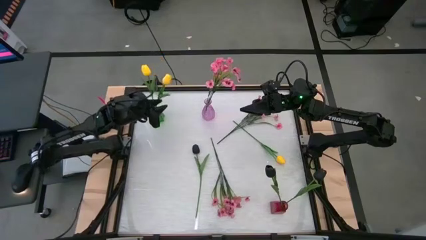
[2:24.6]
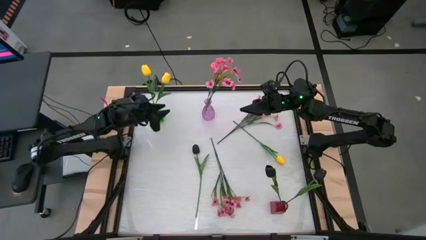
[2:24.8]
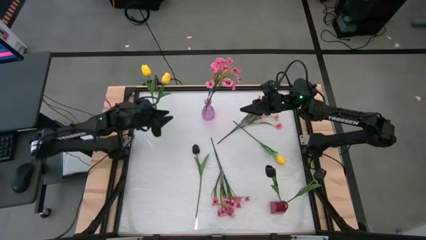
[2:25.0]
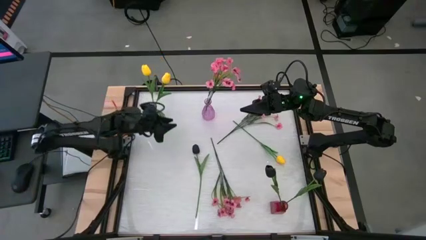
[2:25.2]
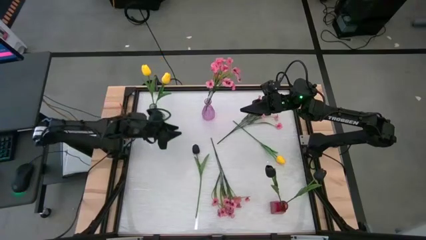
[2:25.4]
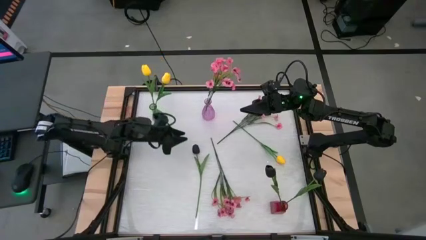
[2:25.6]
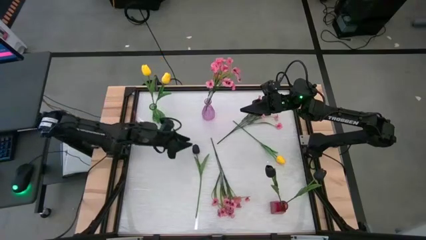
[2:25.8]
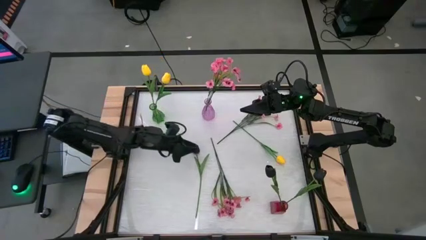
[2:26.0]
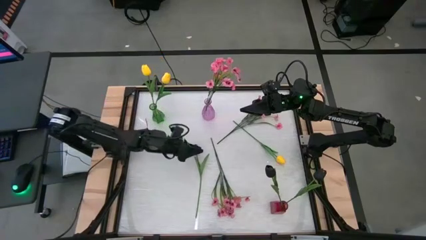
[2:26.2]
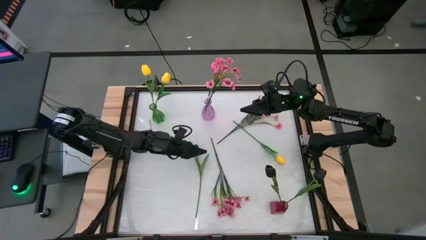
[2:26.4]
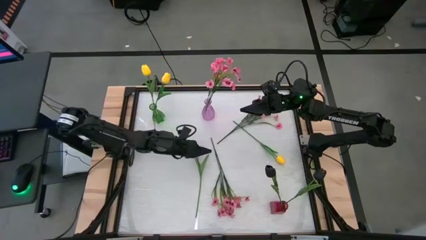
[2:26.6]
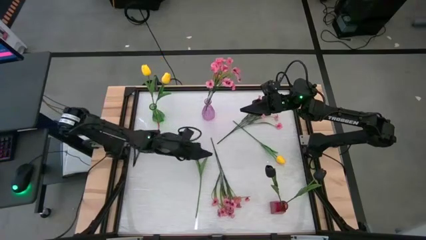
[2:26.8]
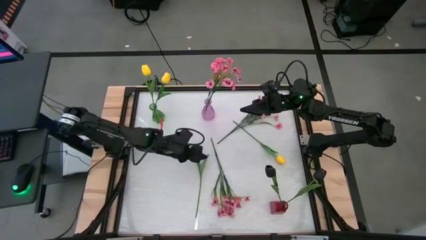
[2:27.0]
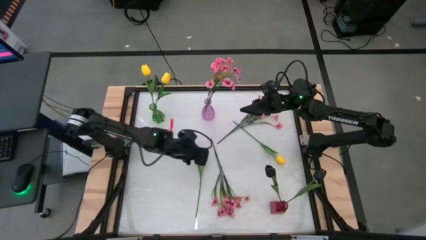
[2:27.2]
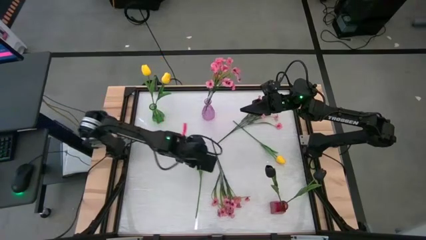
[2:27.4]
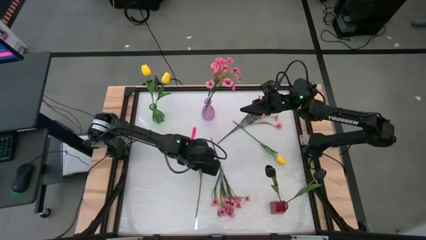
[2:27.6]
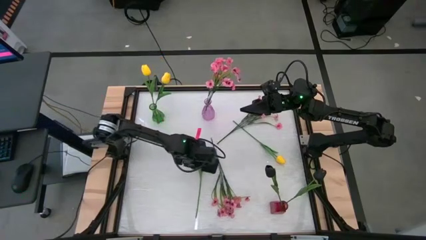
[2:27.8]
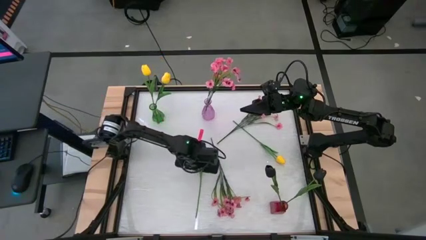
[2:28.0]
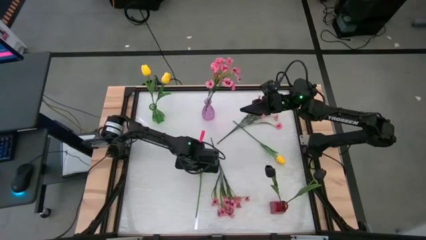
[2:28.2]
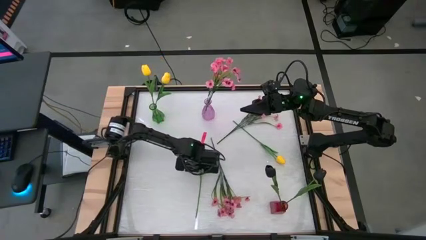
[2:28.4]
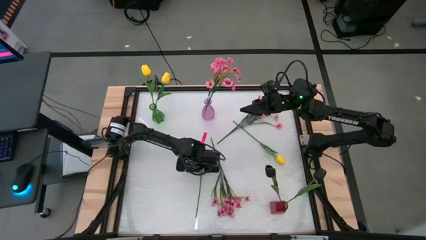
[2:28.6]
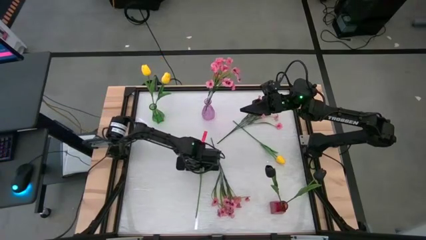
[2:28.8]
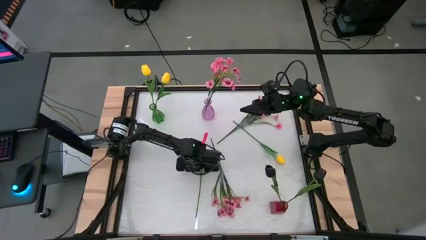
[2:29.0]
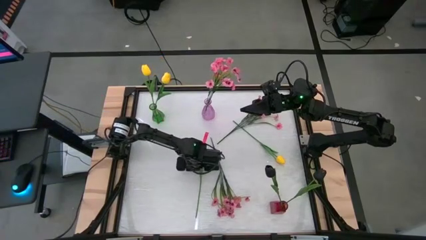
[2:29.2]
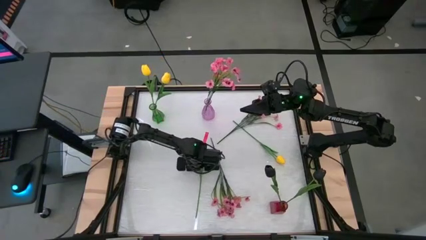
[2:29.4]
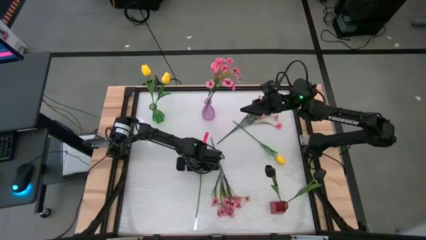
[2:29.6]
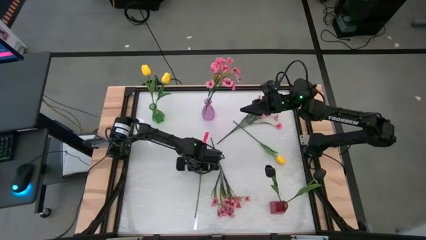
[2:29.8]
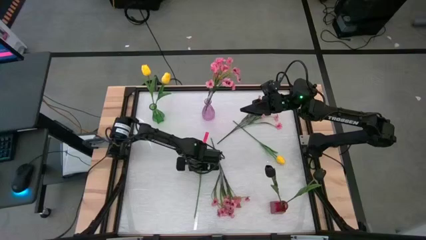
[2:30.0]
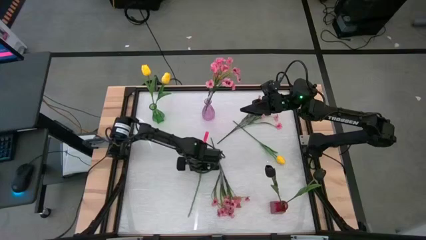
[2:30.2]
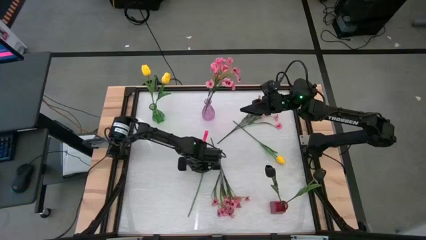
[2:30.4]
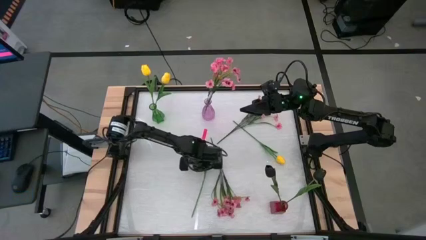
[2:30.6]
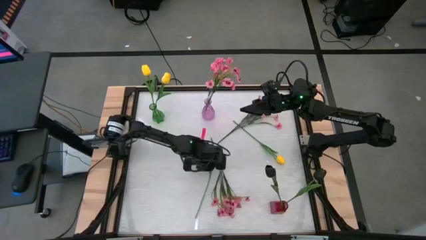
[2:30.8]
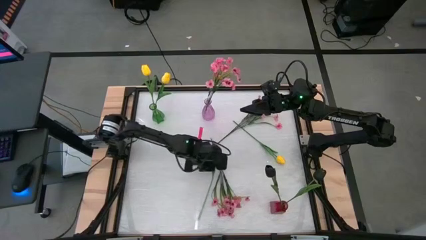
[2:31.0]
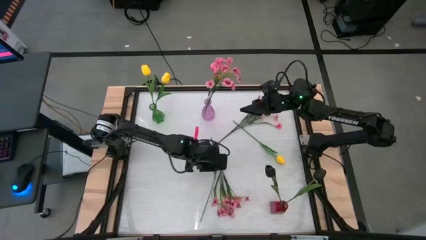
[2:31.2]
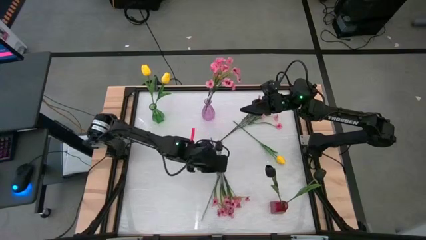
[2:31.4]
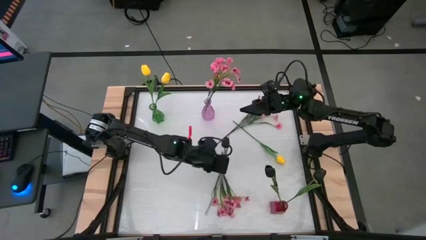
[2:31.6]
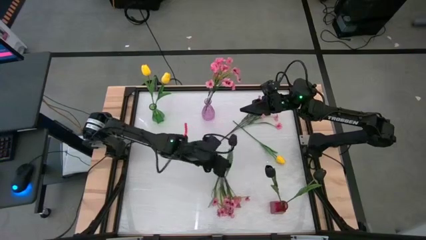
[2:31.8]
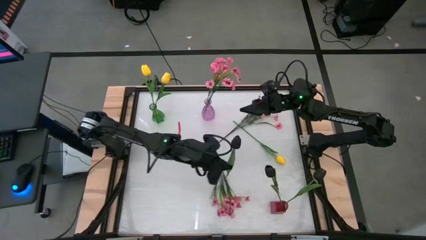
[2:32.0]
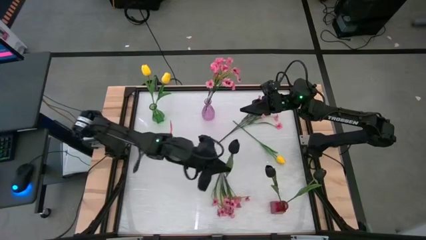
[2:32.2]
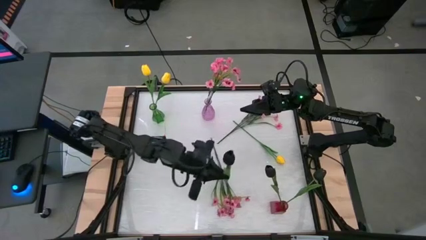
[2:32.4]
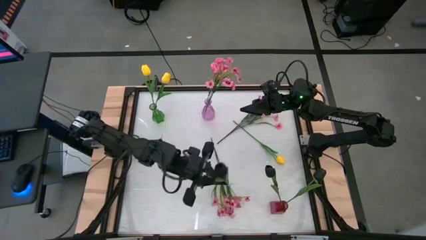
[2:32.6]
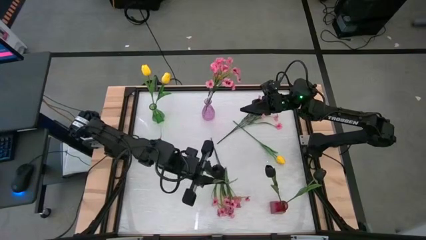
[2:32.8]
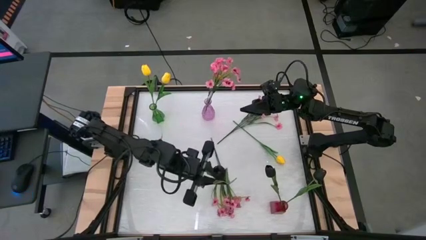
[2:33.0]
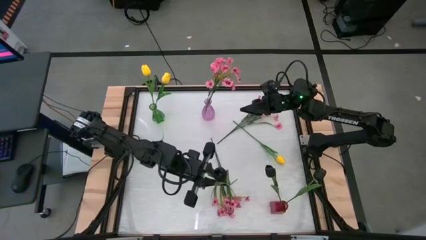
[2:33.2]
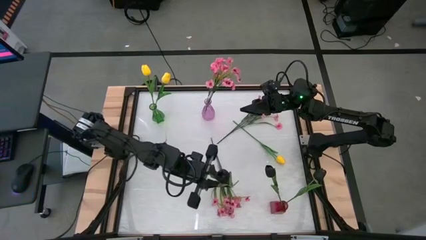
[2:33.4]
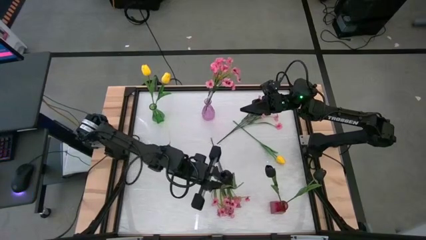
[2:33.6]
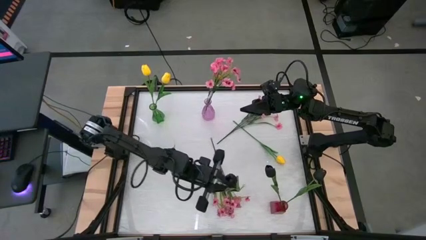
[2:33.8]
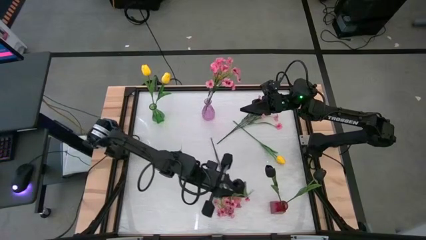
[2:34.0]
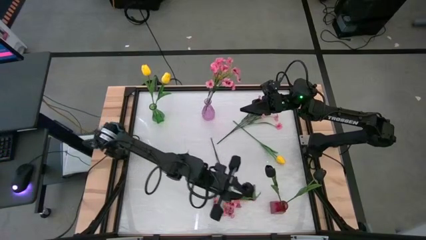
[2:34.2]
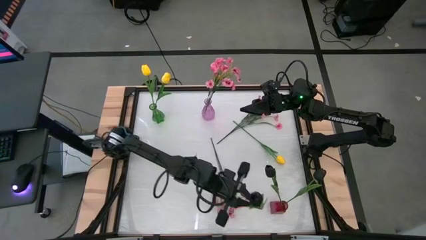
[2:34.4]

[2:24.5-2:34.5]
Task: Sort flowers into vase by color
Put the black flower into the red vase

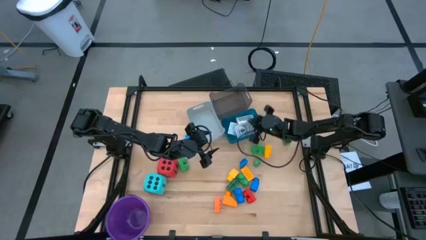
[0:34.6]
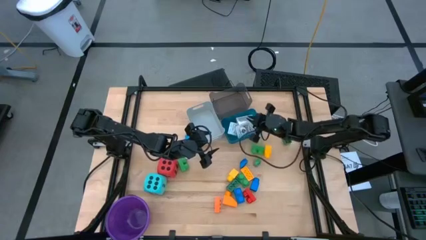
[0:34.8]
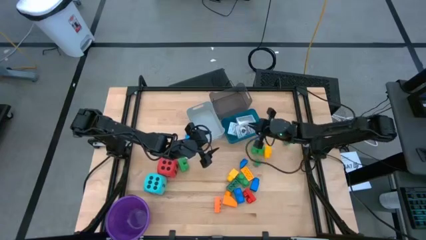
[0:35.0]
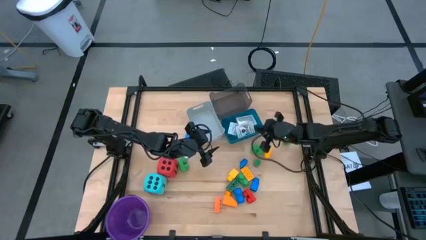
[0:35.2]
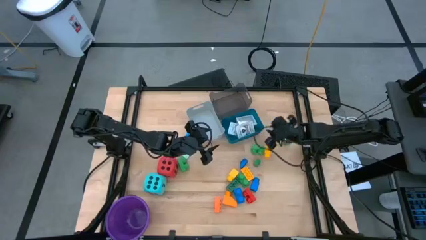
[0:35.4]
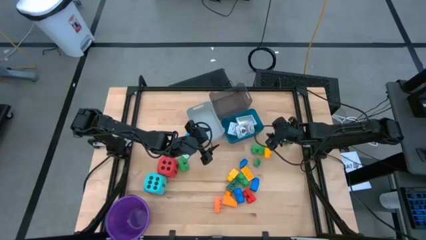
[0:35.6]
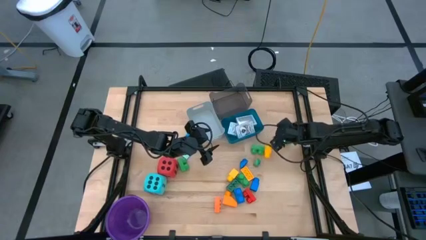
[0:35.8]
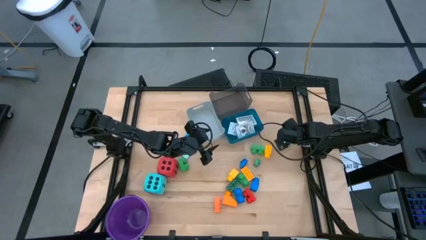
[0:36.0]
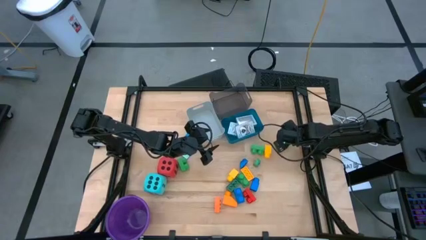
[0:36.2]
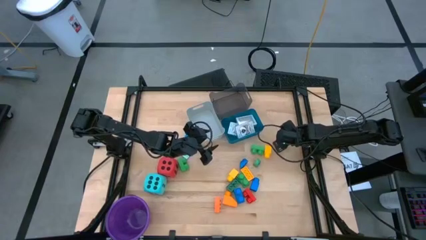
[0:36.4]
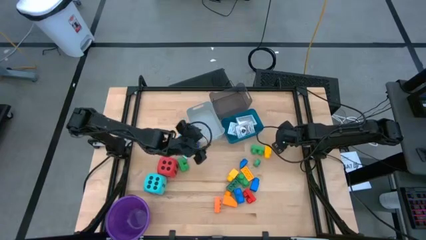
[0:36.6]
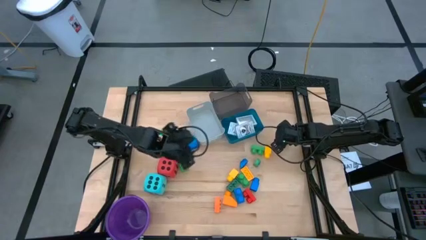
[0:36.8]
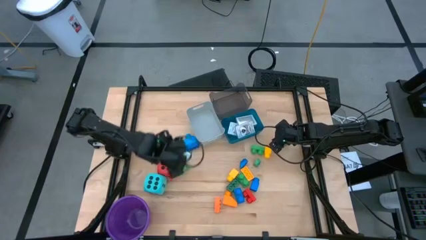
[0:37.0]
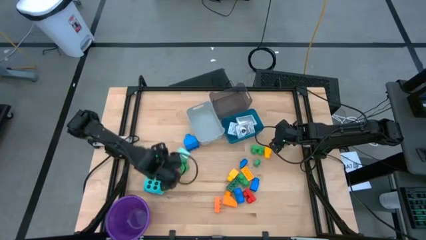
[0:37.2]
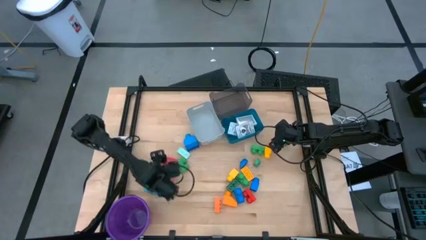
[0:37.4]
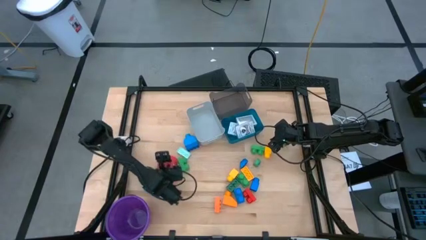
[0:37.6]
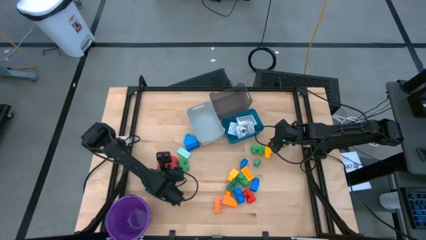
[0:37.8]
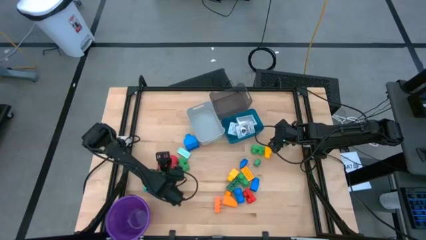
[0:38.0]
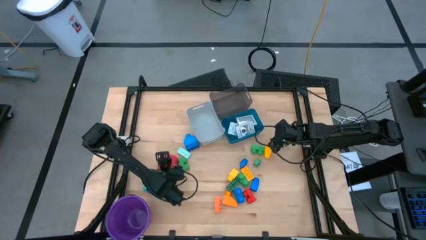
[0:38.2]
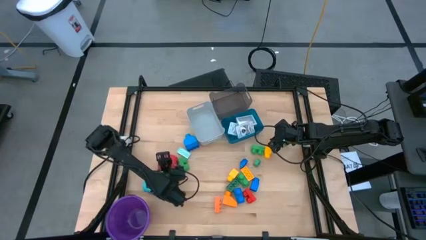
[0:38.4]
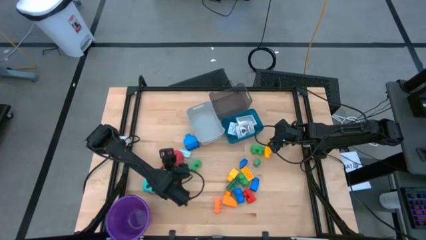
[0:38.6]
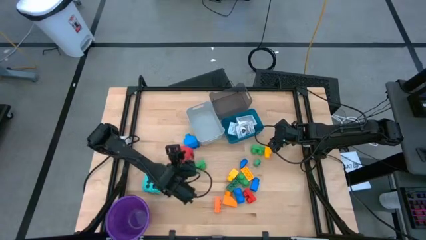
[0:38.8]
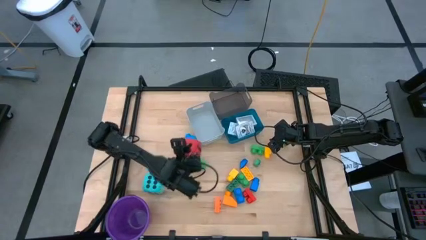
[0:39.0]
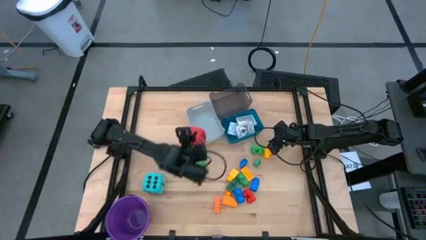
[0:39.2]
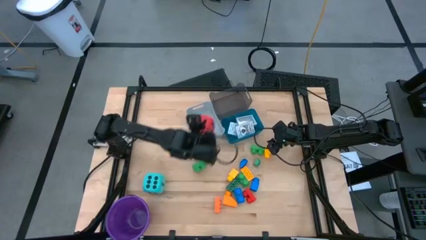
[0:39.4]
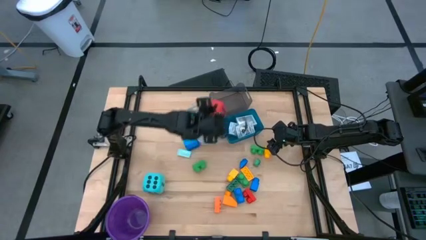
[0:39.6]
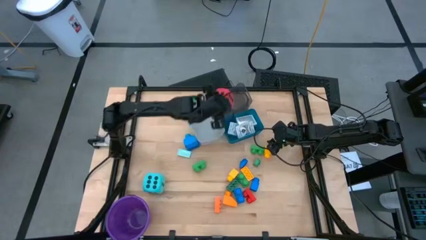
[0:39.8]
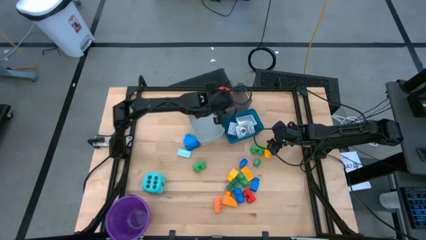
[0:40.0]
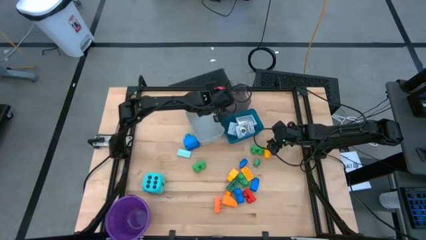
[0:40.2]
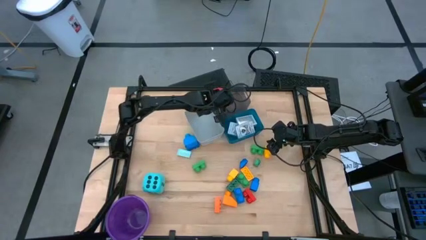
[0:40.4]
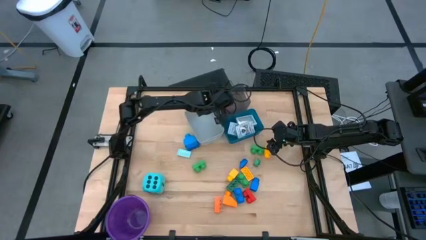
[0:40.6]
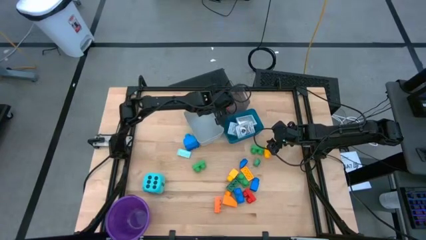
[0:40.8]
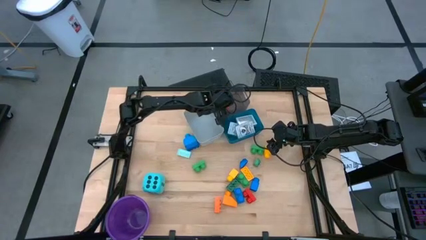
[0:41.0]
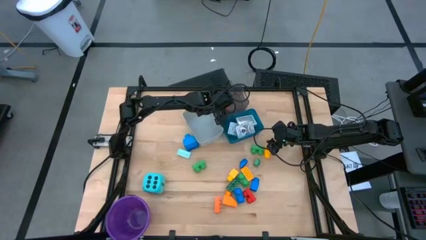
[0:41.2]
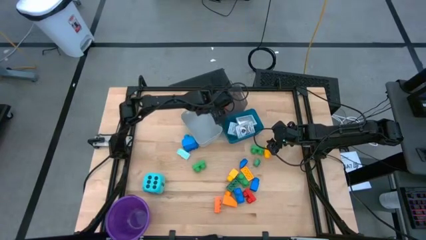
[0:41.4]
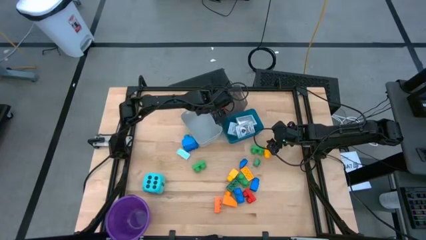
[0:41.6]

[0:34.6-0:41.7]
Task: Pick & Place Toys
Put the red dice into the black bin
